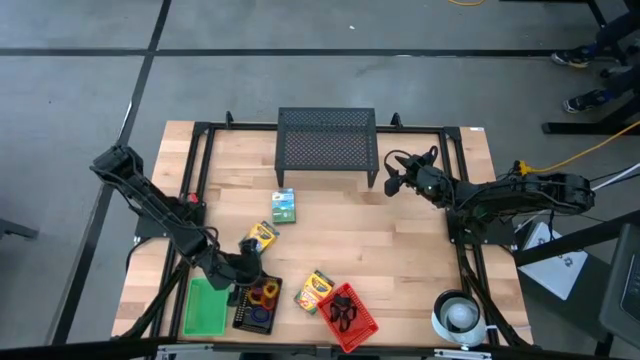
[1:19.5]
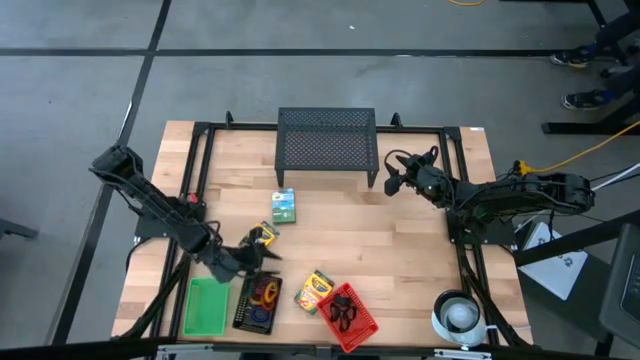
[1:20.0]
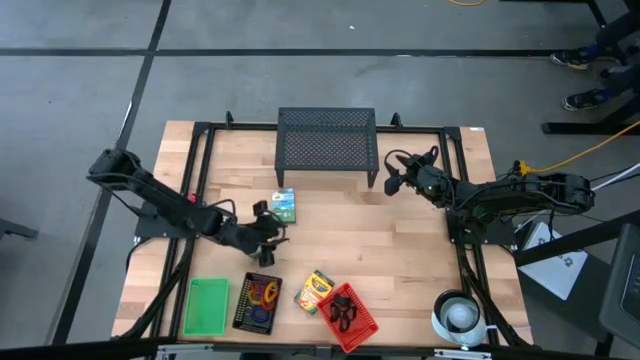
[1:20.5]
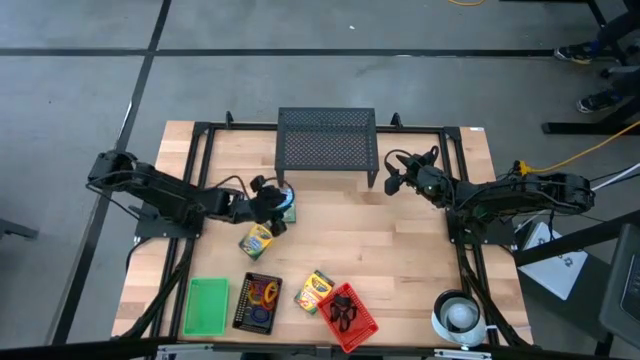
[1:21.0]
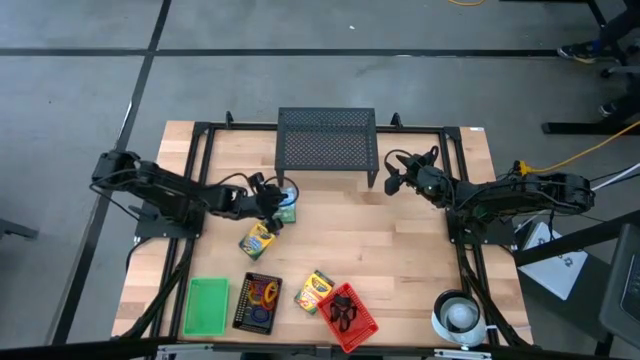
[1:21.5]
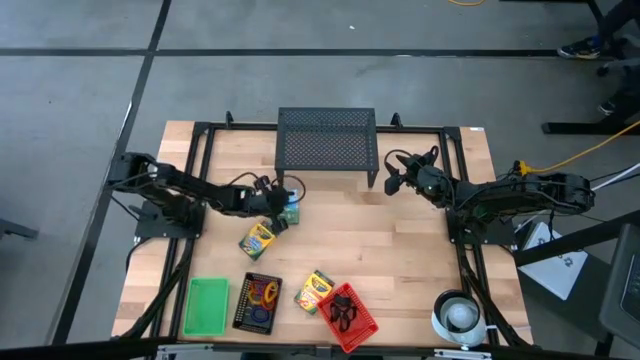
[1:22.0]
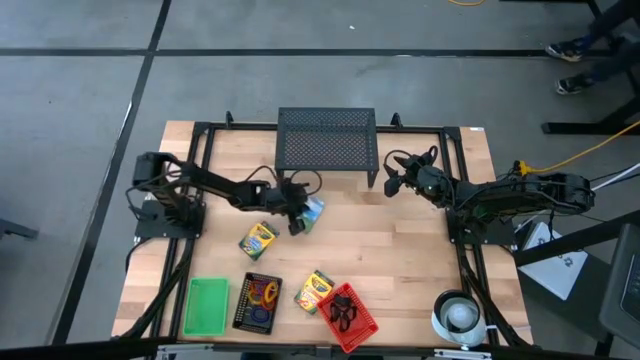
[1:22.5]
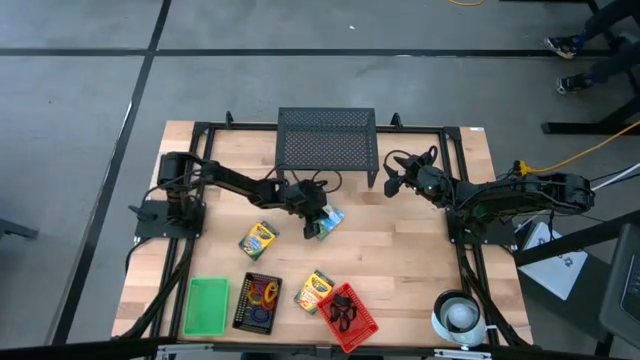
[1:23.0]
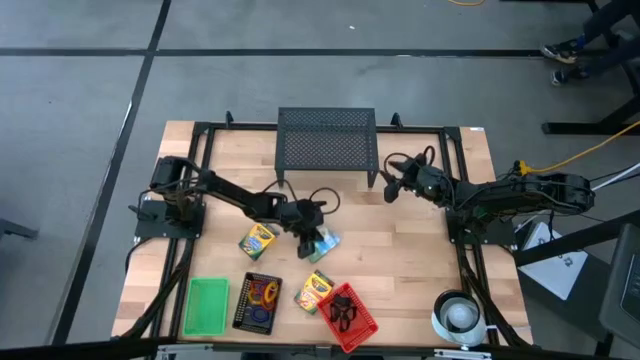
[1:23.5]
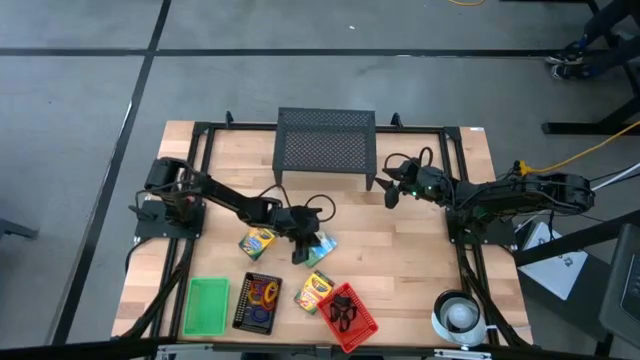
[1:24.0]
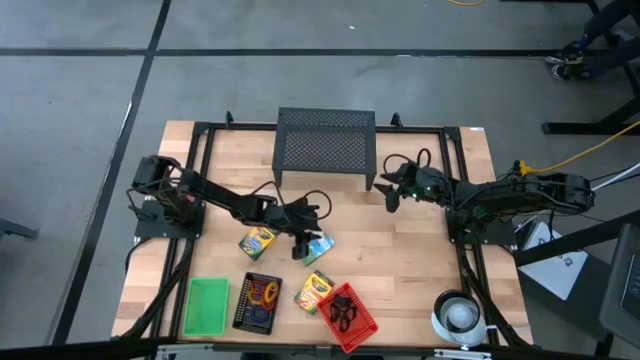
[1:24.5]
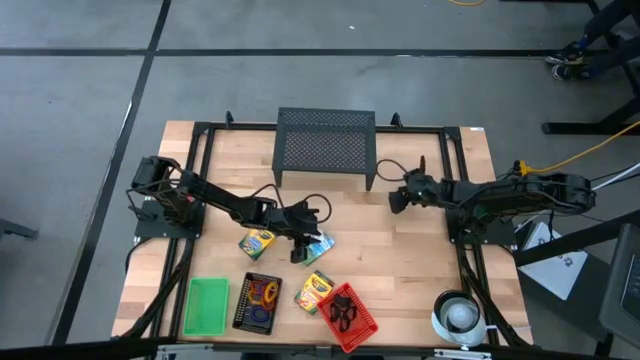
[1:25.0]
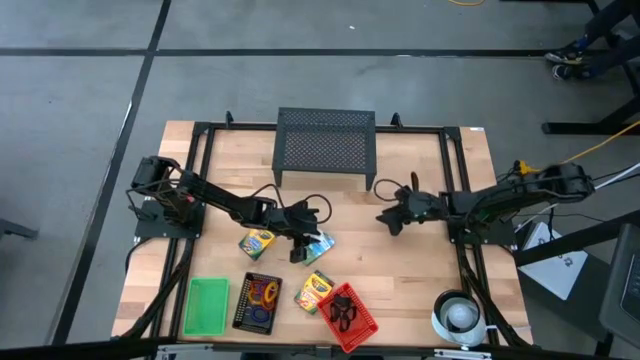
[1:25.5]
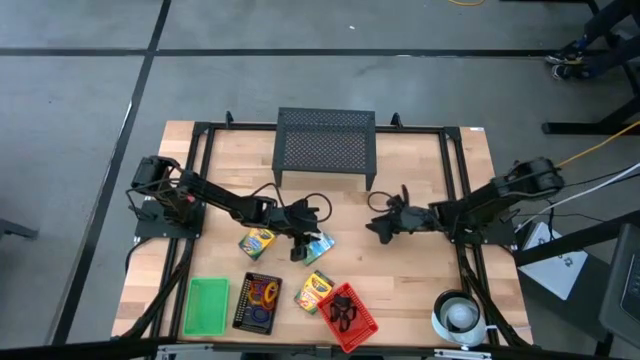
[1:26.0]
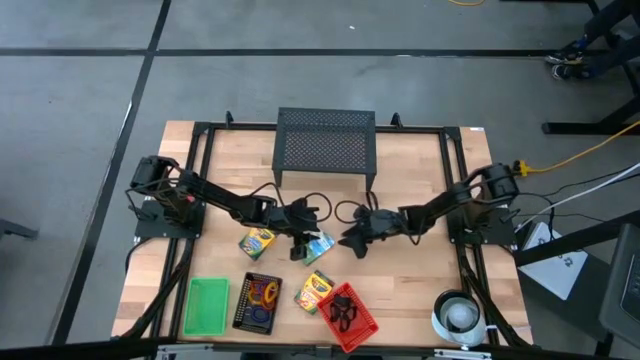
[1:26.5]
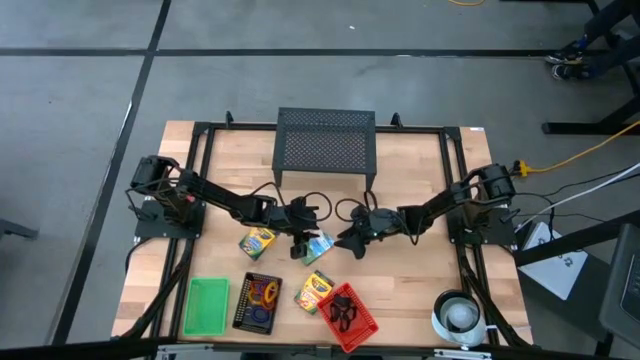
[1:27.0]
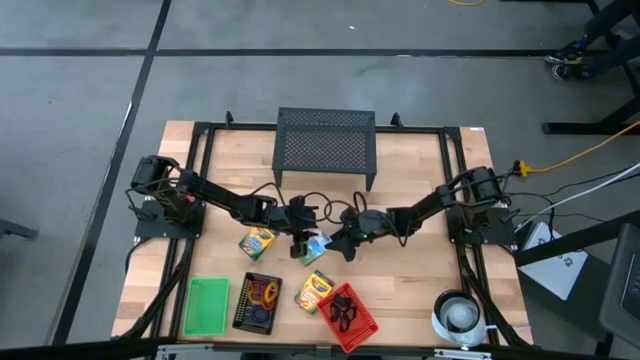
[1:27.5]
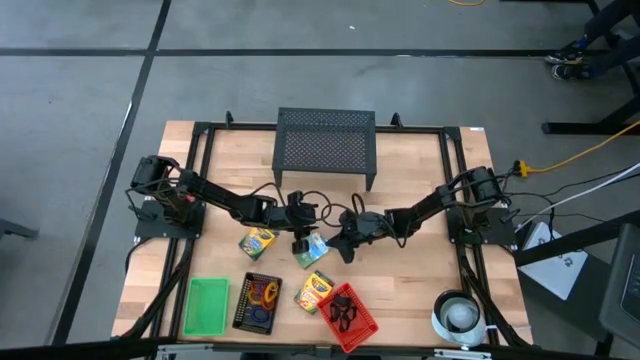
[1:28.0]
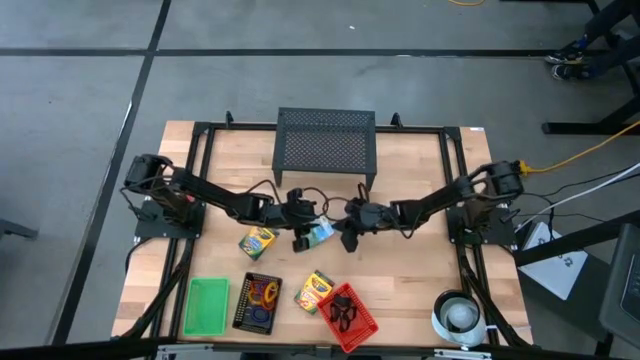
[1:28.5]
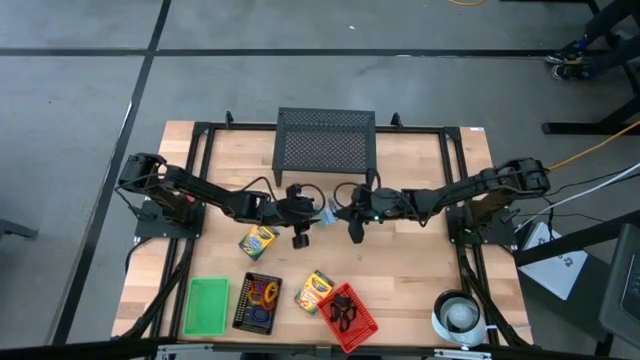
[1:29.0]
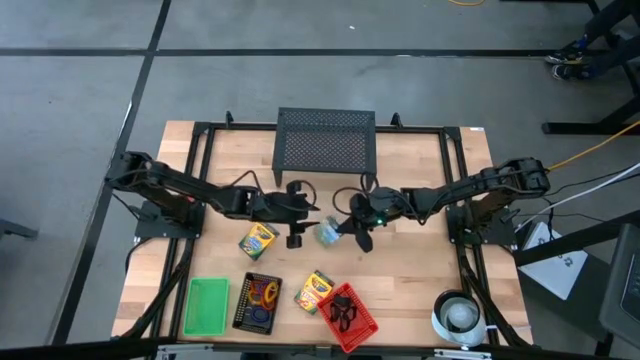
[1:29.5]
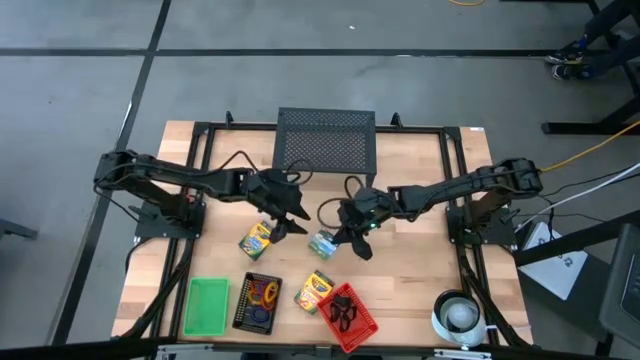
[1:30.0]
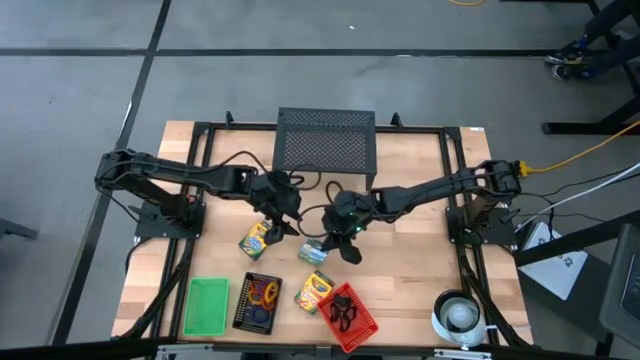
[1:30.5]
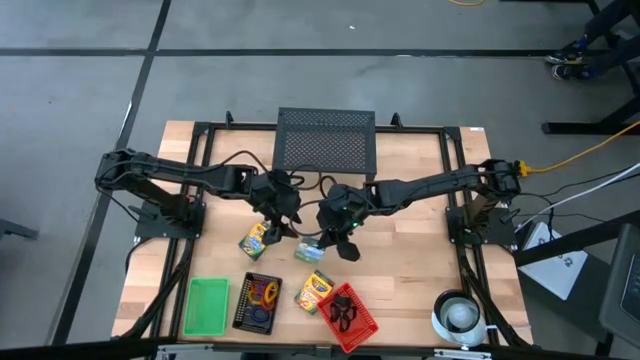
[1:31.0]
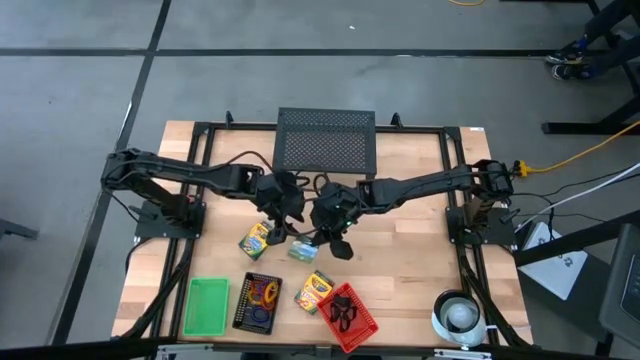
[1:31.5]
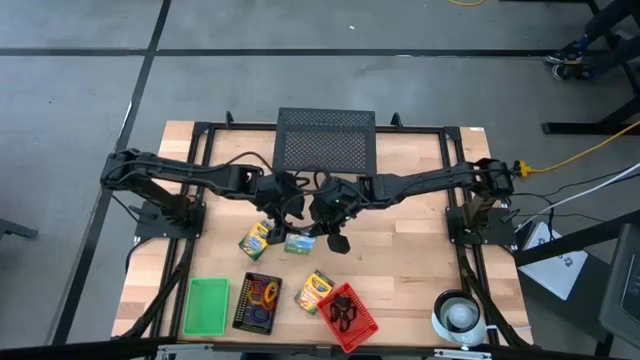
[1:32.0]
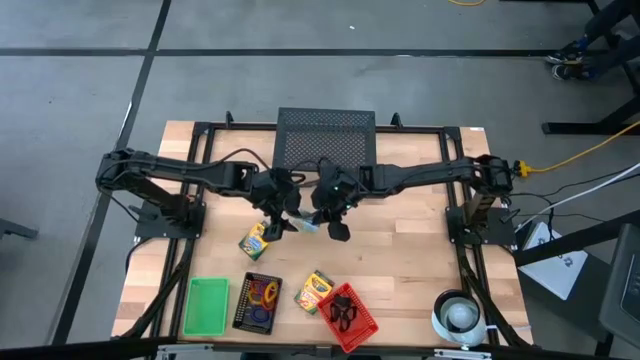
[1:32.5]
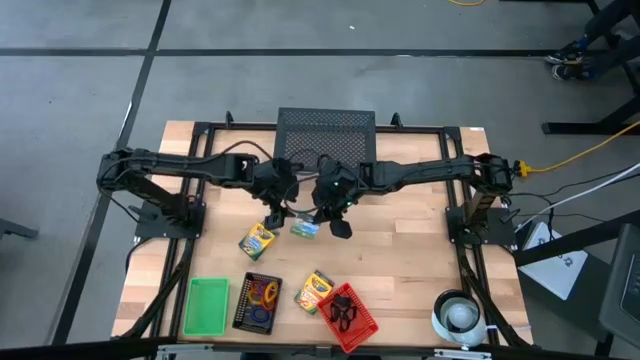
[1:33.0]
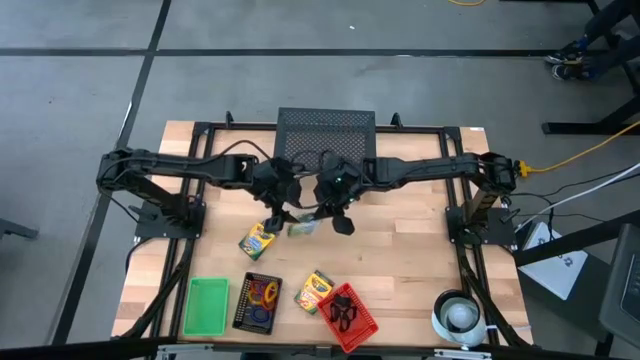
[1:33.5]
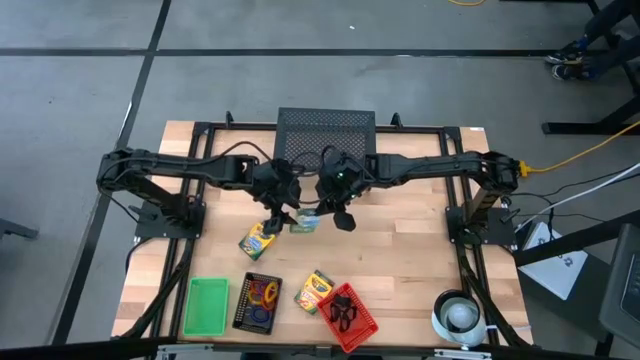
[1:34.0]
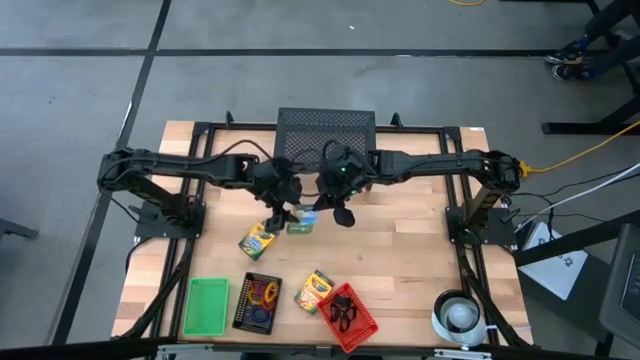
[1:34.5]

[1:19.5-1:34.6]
Task: Pick & Place Office Desk Supplies
Put the green crayon box into the green bin

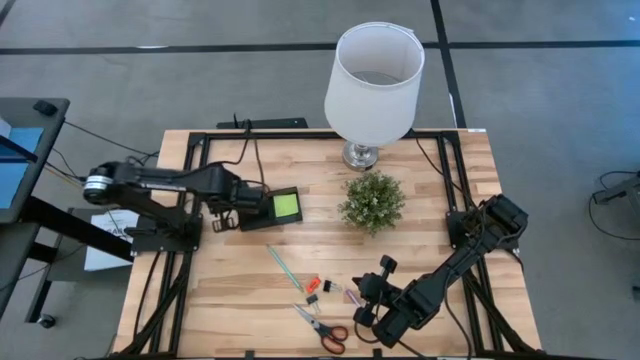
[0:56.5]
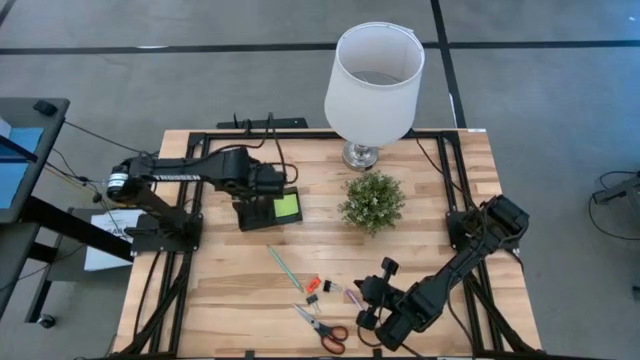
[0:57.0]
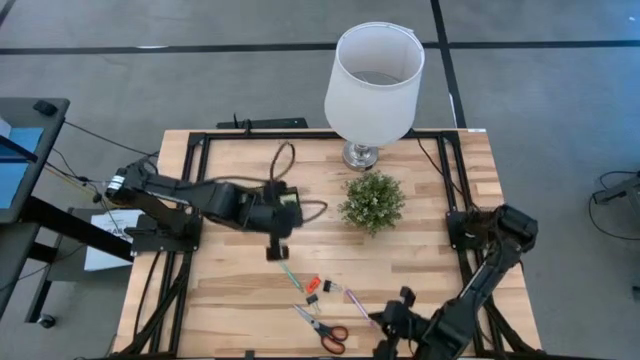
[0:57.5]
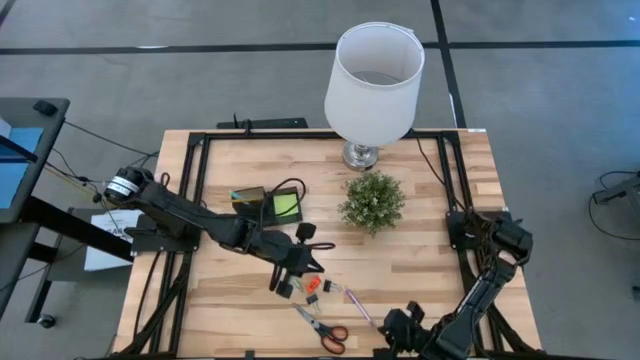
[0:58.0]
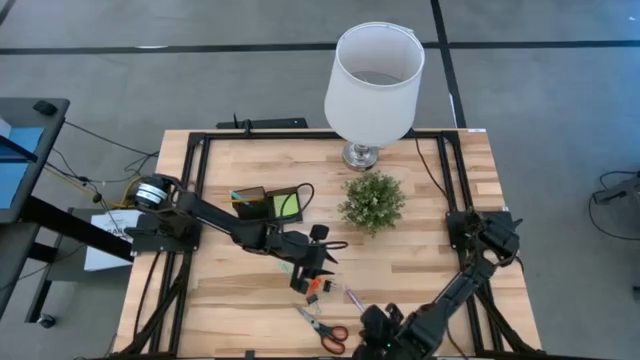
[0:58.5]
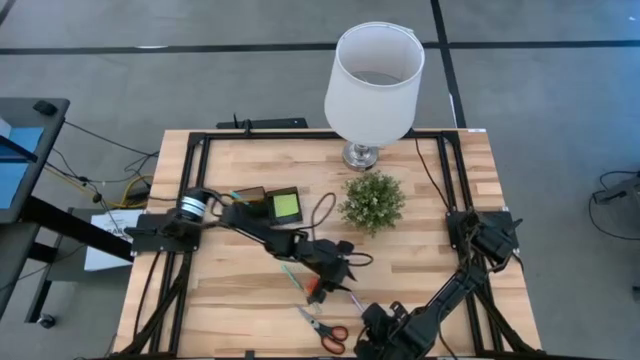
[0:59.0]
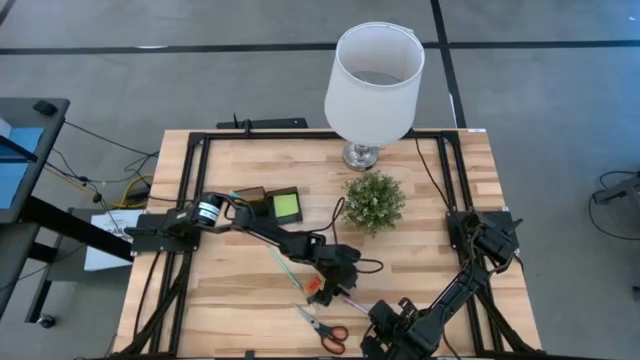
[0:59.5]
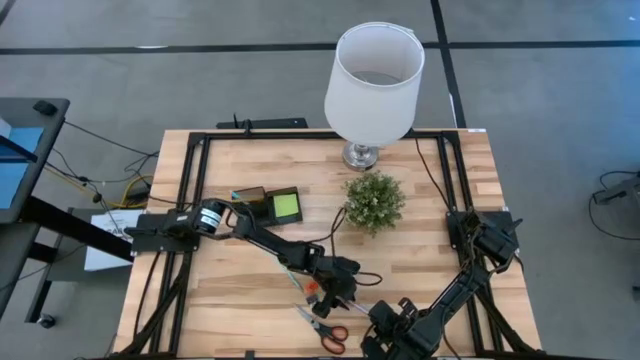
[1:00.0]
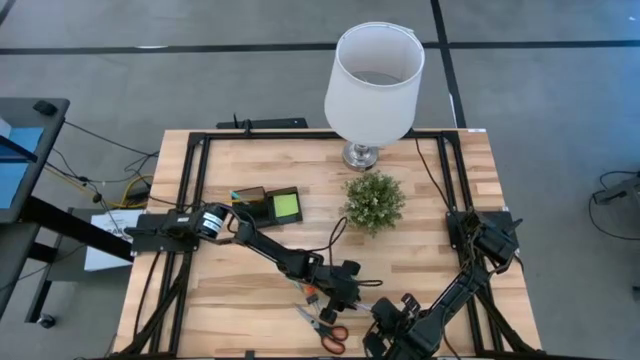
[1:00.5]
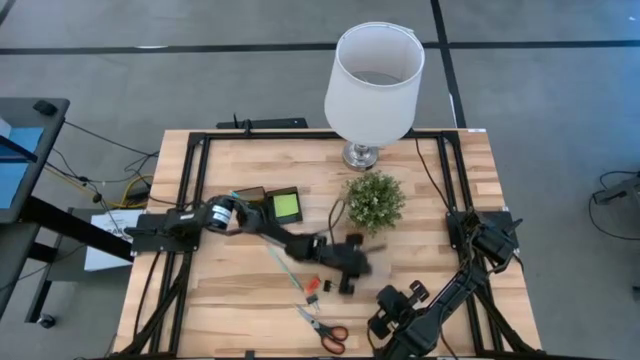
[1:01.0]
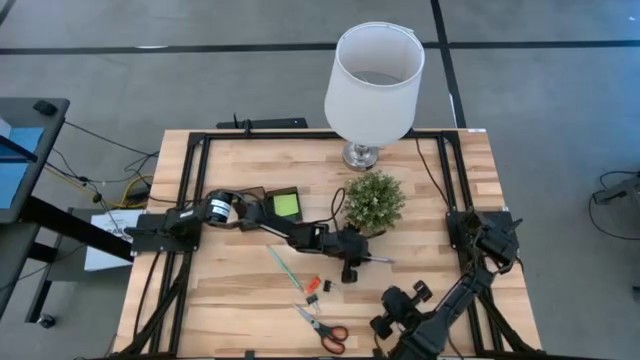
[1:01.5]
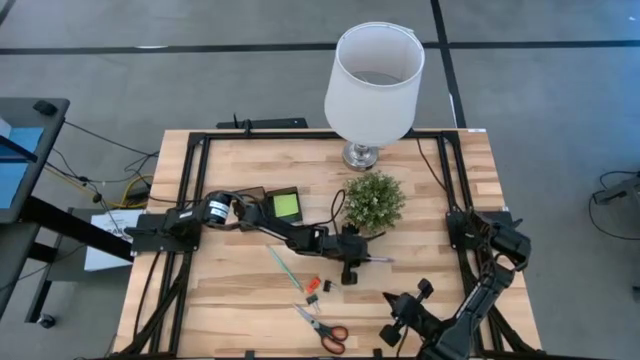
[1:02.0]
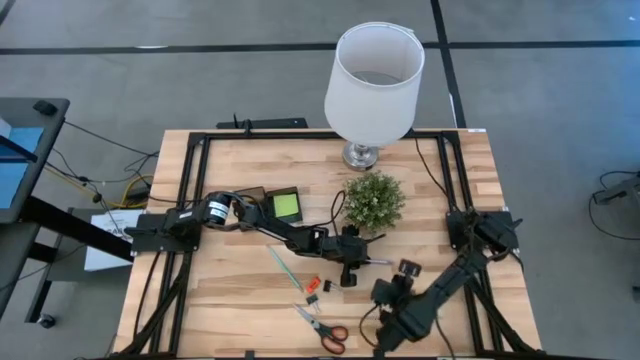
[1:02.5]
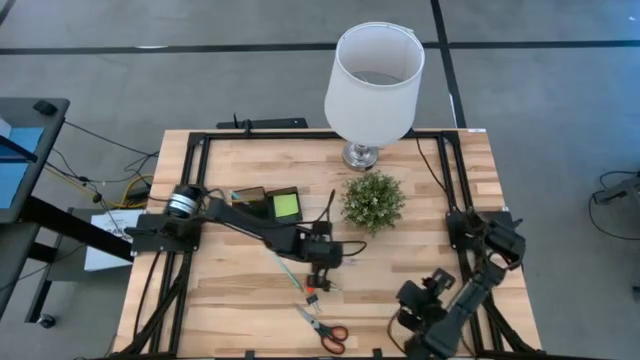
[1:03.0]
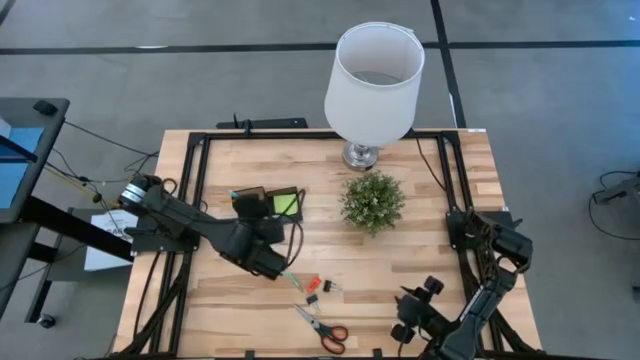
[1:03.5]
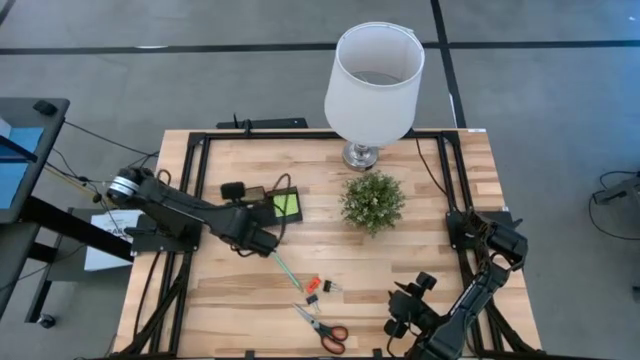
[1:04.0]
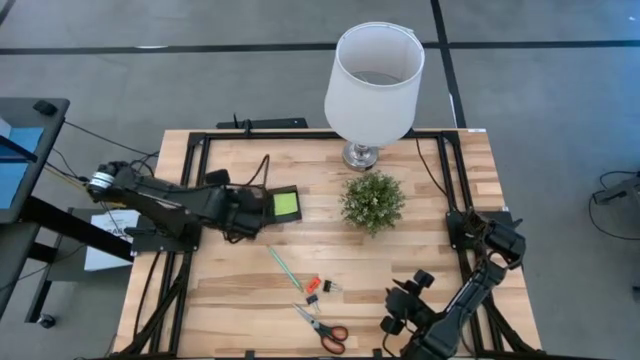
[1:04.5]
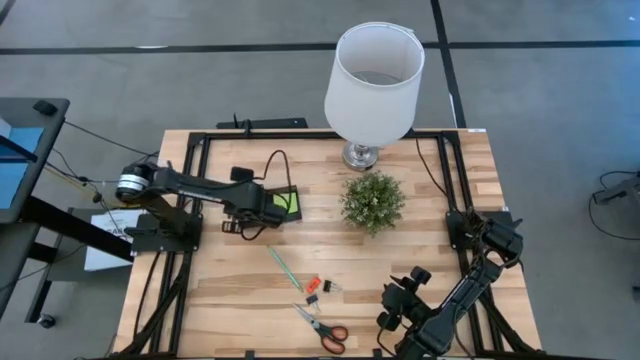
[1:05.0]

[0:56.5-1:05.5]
Task: Pick and place office supplies into organizer
Put the purple pen into the black desk organizer
